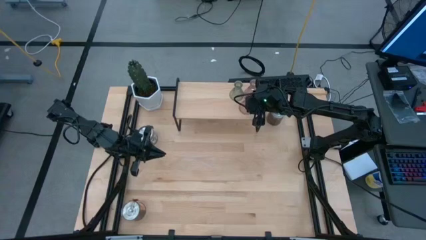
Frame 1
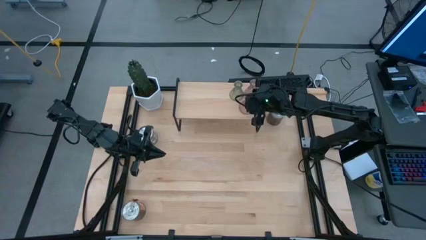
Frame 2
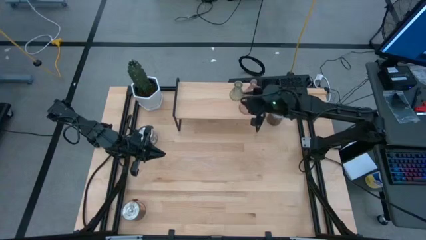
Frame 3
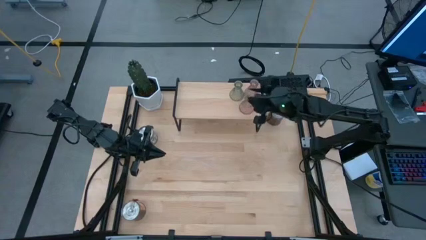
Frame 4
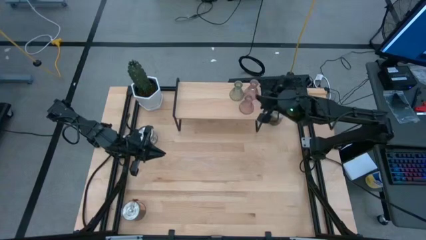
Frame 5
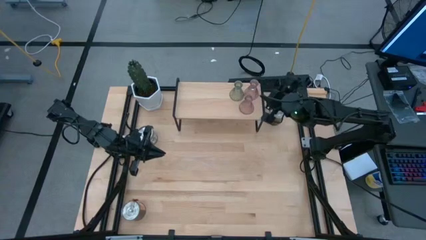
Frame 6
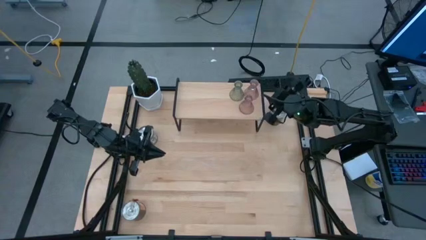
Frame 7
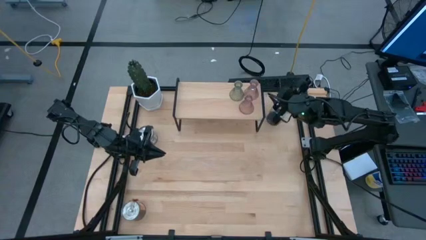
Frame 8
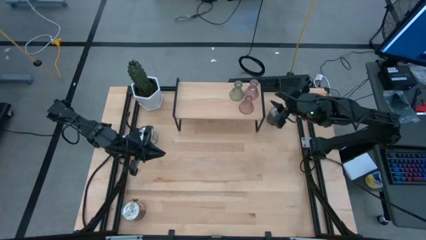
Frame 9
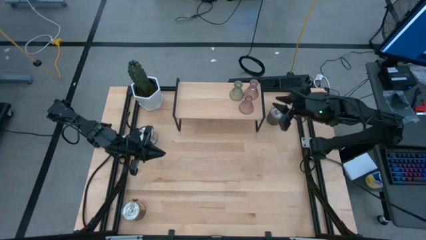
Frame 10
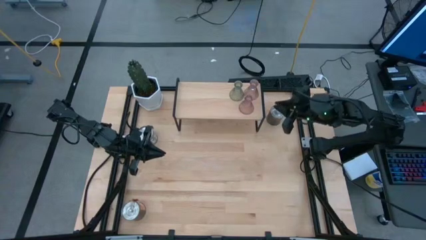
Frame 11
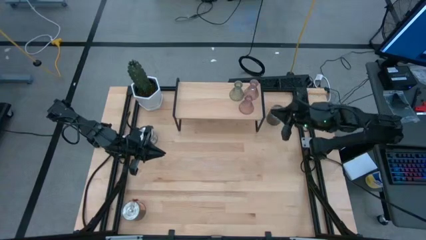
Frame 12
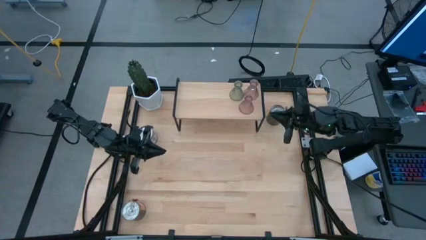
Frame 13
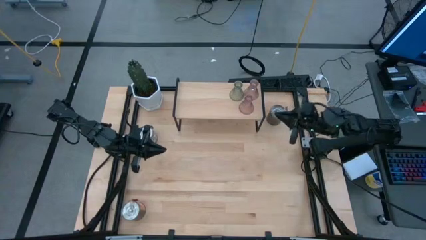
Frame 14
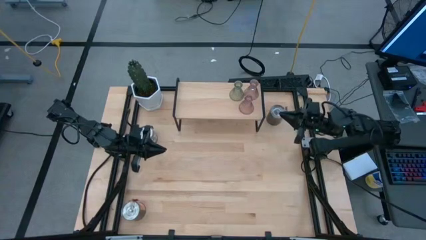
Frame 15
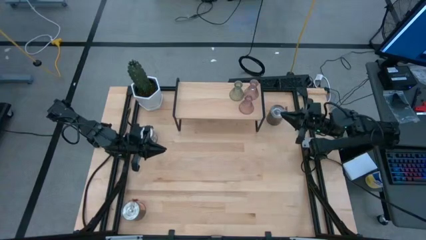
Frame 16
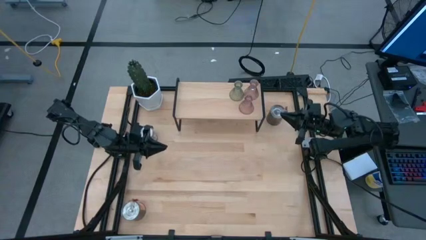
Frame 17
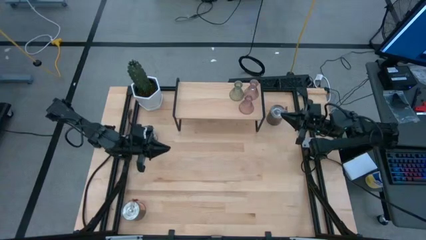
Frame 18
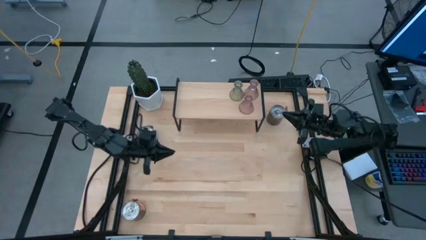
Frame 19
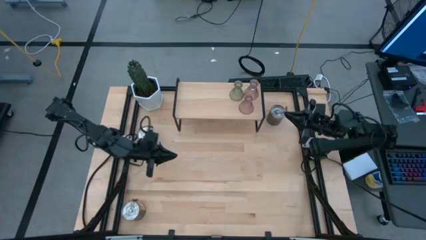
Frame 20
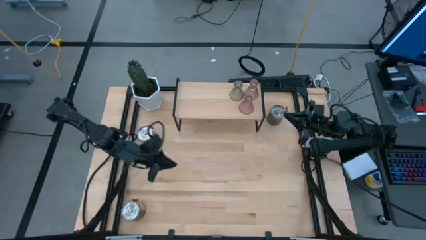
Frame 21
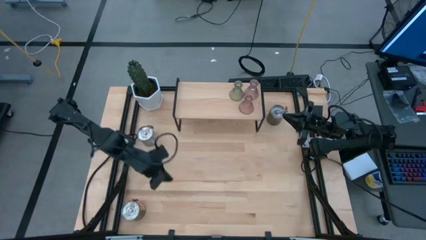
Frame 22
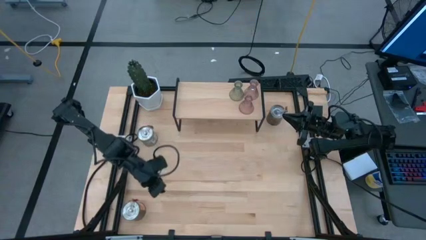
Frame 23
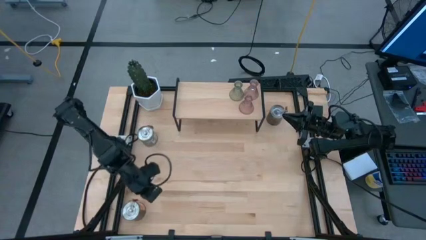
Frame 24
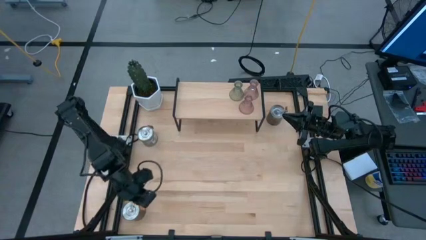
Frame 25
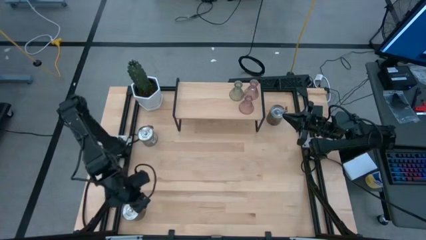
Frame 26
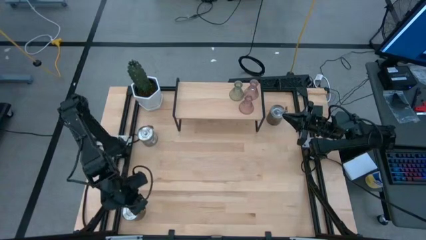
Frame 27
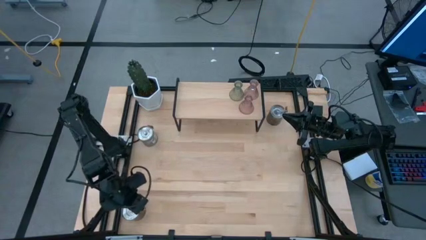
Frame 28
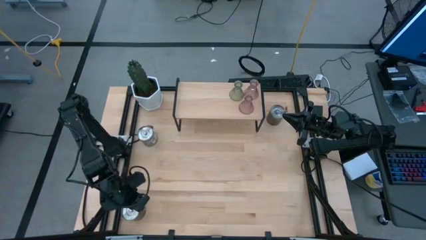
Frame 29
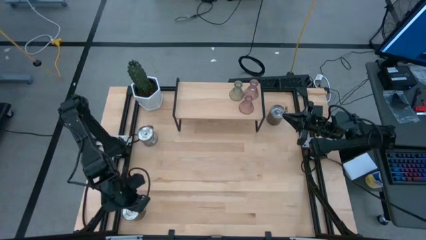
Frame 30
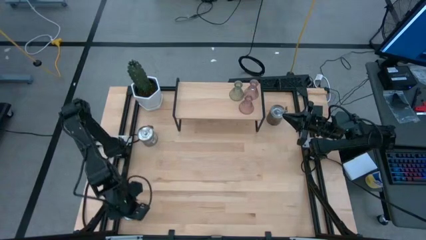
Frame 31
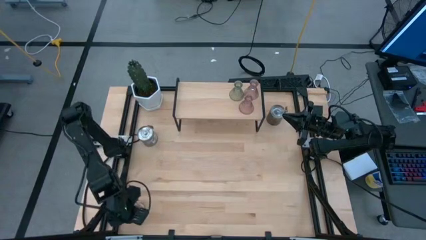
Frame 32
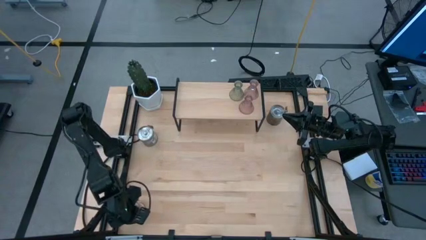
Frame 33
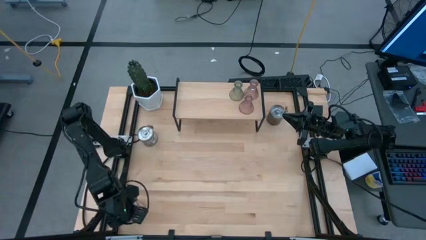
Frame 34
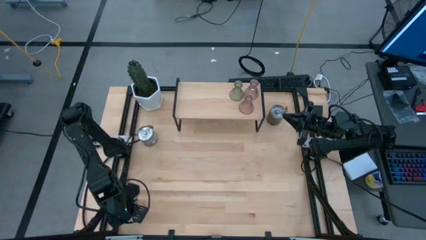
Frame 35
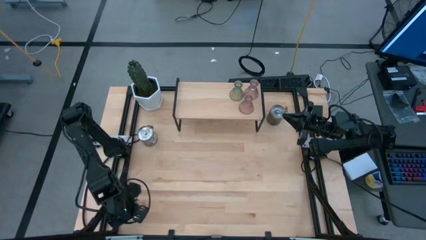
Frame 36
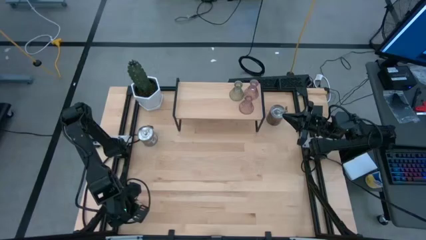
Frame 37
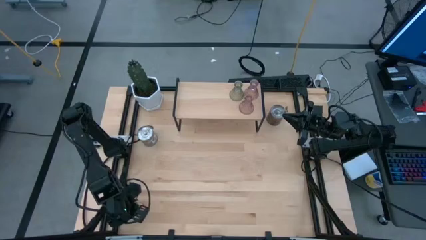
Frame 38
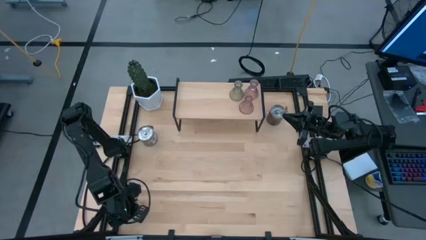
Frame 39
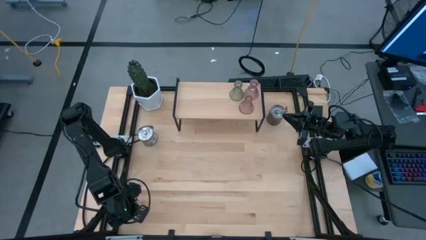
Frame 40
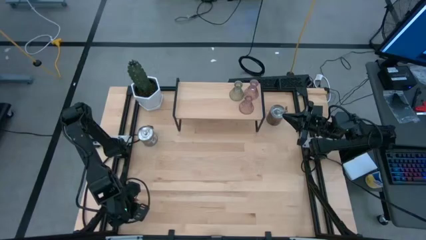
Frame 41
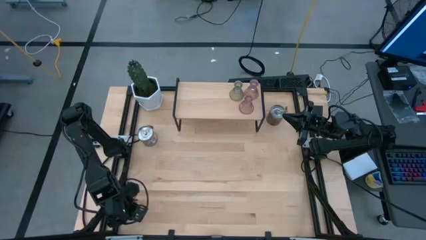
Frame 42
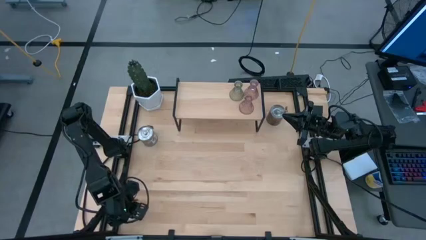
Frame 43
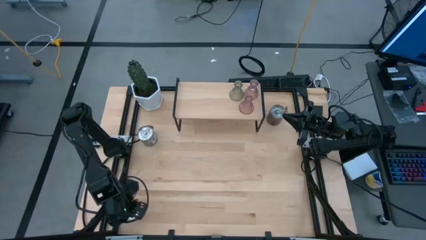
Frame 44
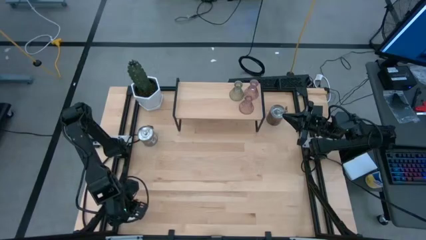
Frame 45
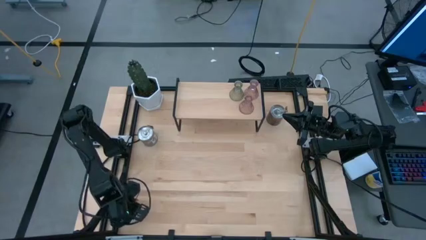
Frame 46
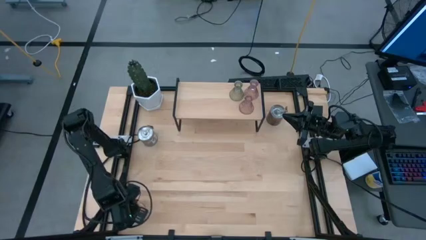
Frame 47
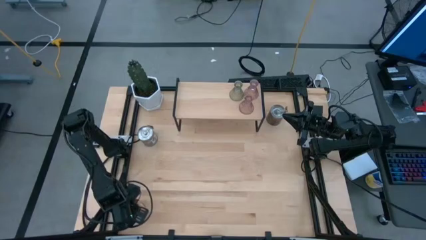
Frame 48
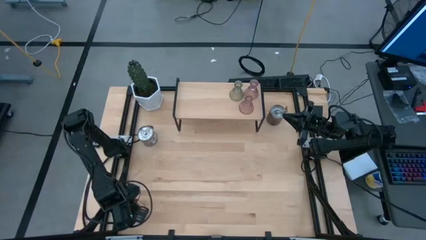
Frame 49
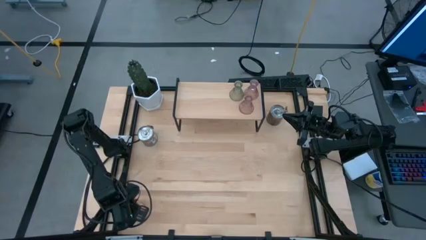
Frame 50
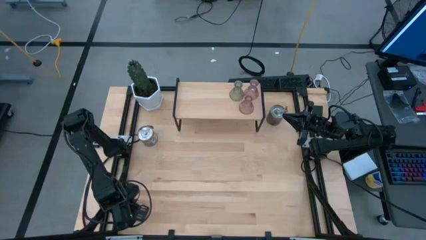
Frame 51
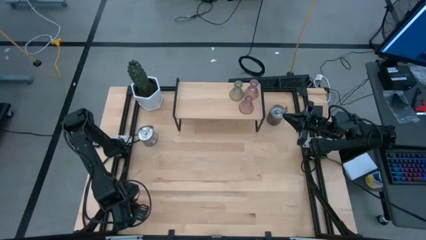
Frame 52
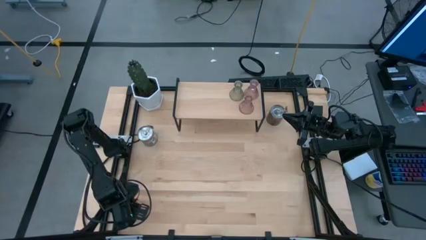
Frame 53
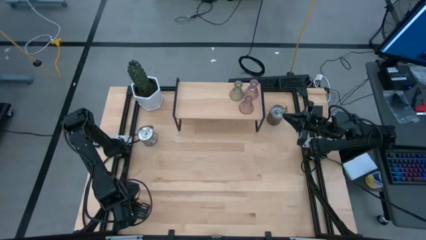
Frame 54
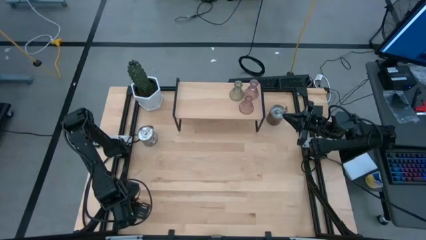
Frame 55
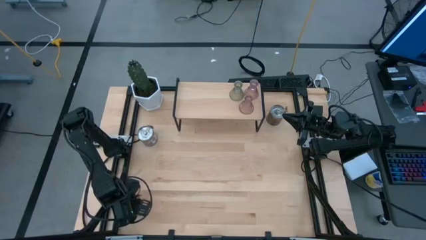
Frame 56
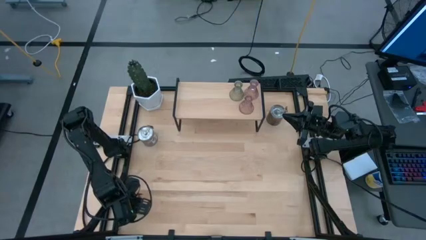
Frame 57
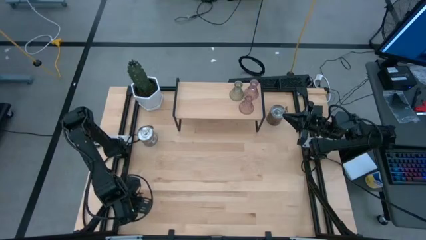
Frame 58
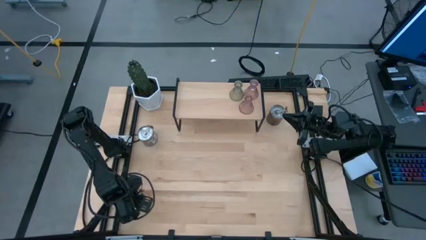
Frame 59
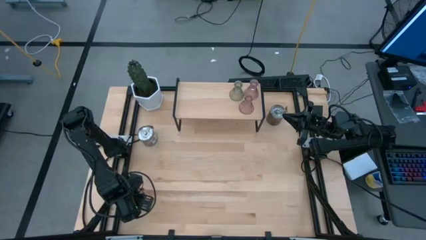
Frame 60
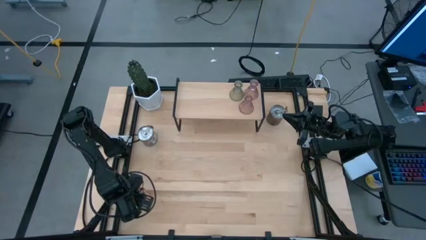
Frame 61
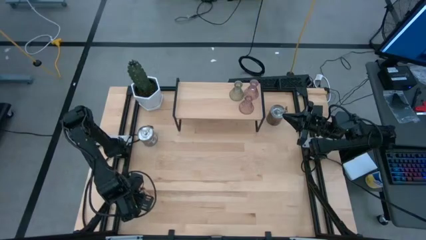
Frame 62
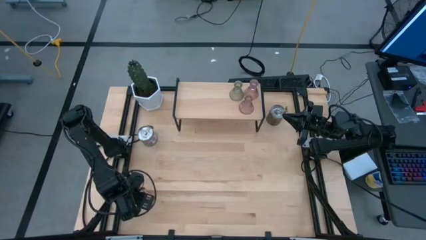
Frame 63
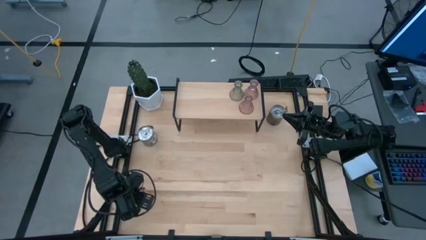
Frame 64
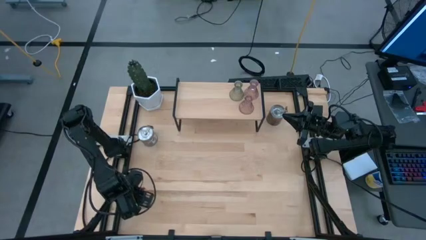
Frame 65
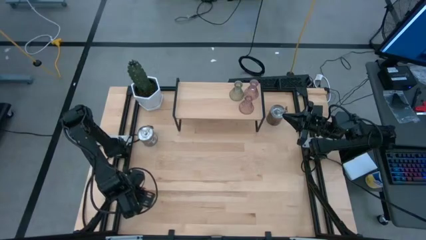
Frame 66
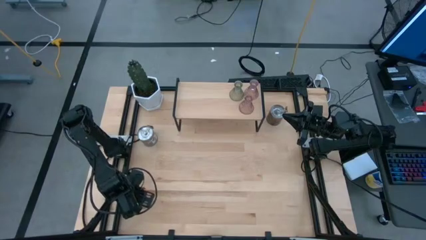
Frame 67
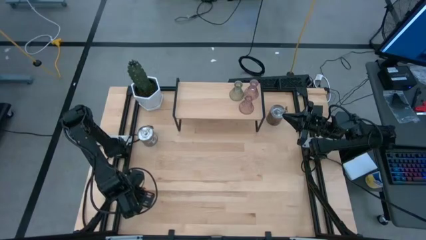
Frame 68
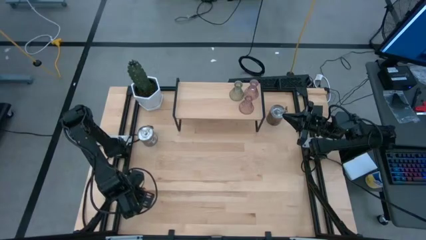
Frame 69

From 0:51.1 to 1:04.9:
Task: Pick & Place candle stick holders
Put the orange scented candle on the shelf
